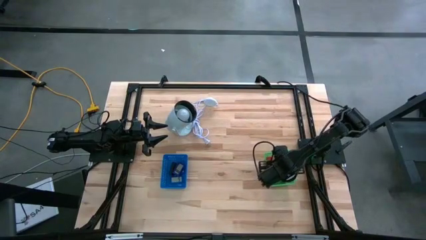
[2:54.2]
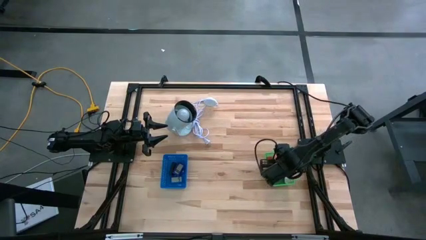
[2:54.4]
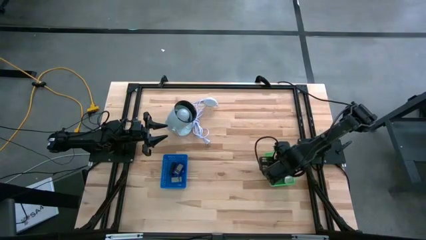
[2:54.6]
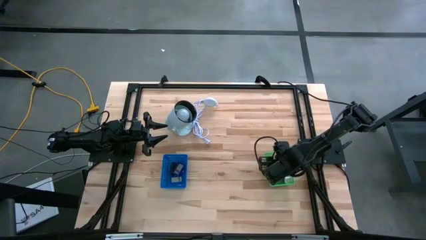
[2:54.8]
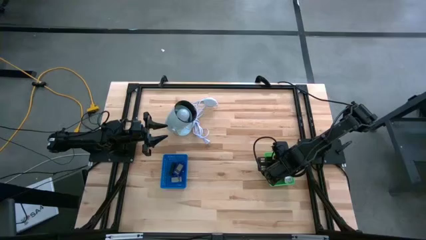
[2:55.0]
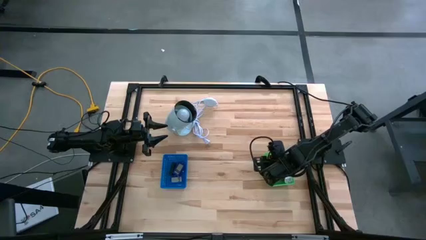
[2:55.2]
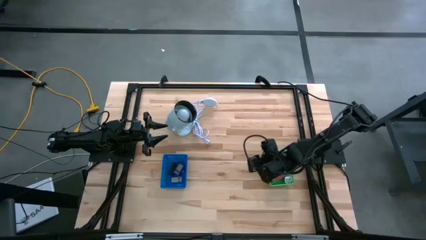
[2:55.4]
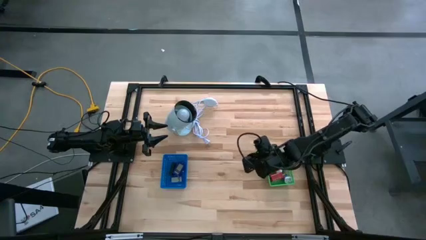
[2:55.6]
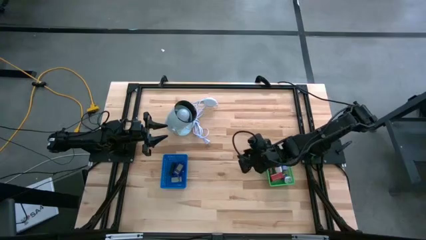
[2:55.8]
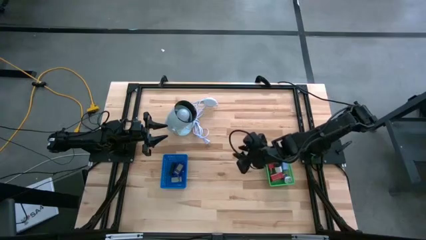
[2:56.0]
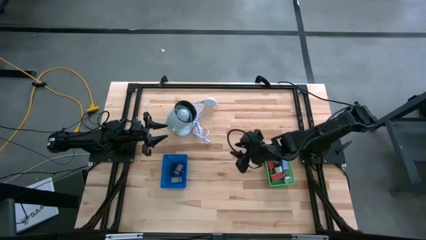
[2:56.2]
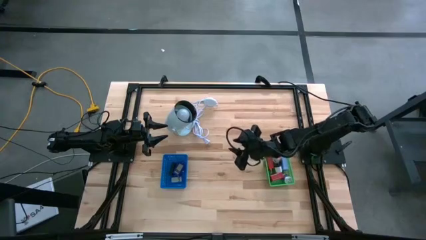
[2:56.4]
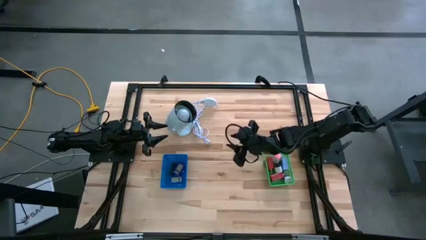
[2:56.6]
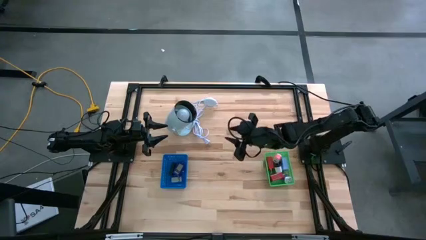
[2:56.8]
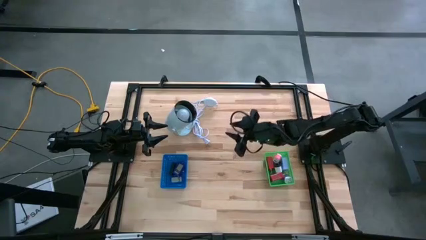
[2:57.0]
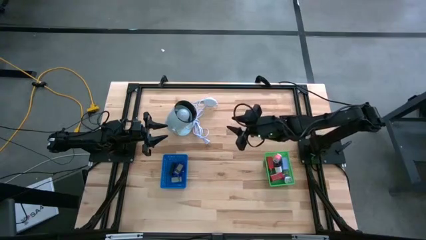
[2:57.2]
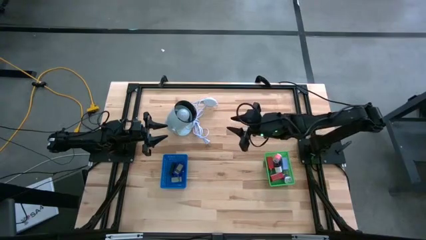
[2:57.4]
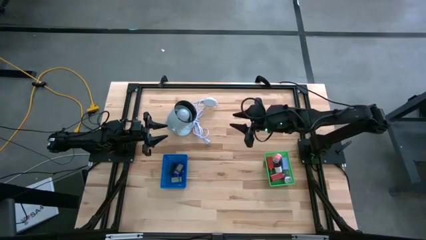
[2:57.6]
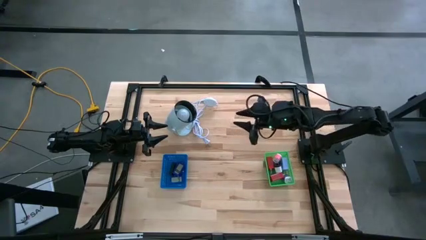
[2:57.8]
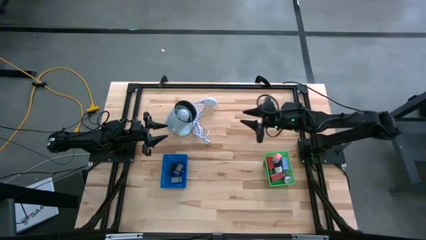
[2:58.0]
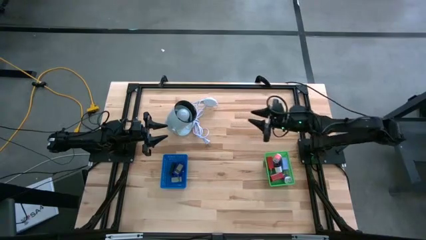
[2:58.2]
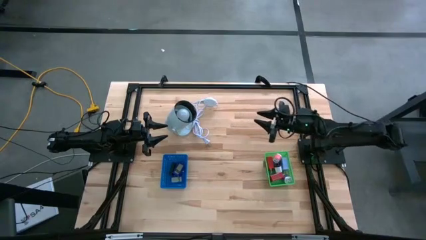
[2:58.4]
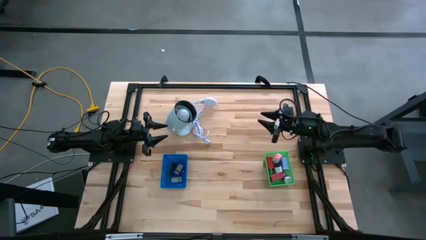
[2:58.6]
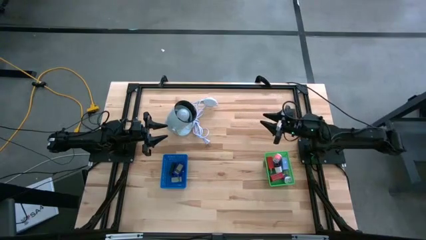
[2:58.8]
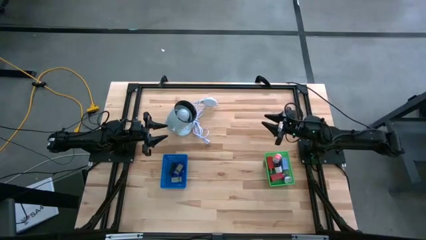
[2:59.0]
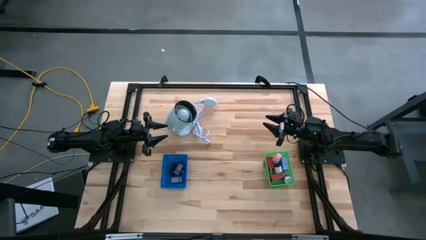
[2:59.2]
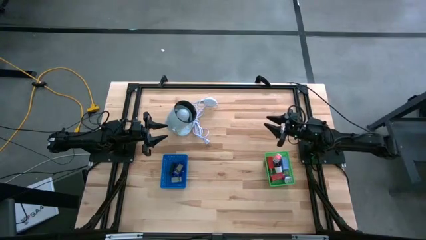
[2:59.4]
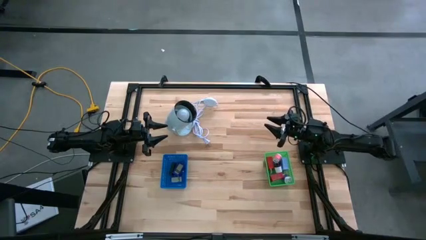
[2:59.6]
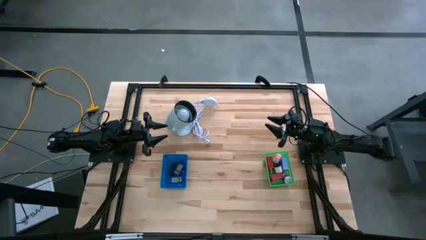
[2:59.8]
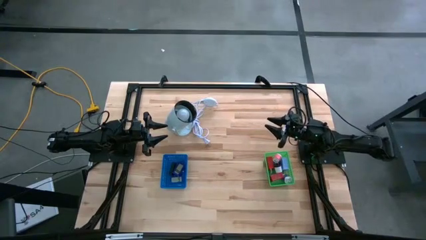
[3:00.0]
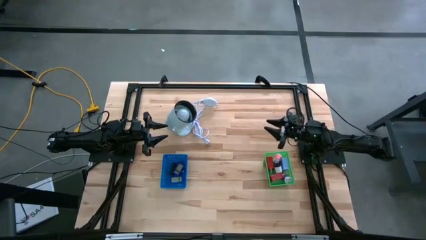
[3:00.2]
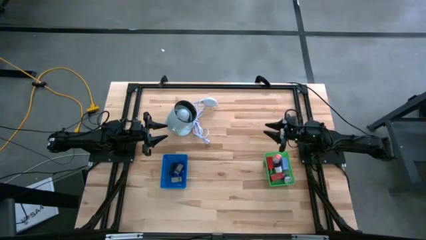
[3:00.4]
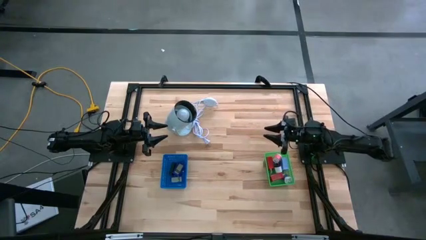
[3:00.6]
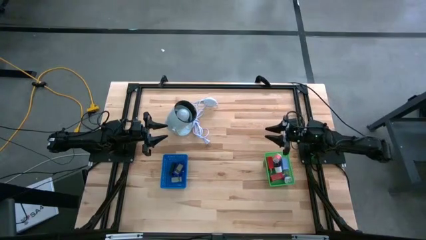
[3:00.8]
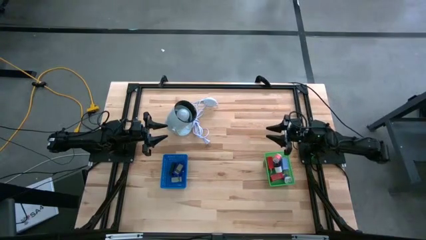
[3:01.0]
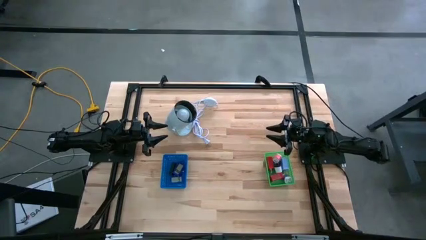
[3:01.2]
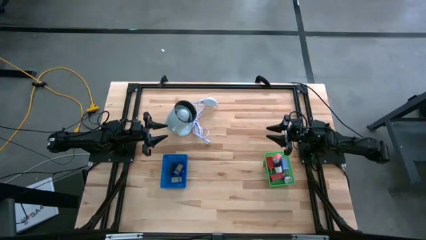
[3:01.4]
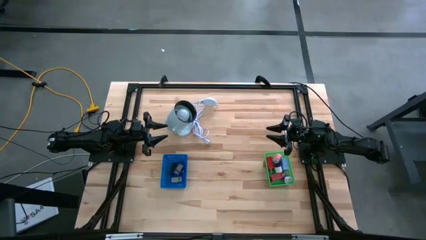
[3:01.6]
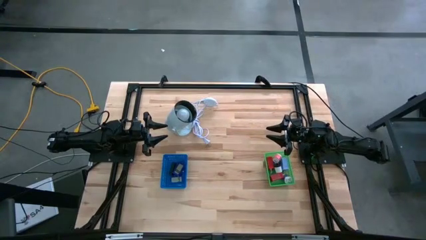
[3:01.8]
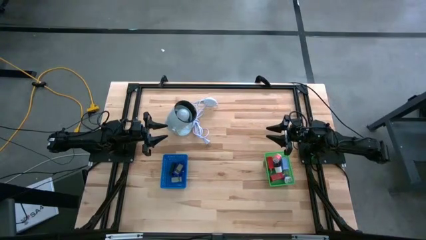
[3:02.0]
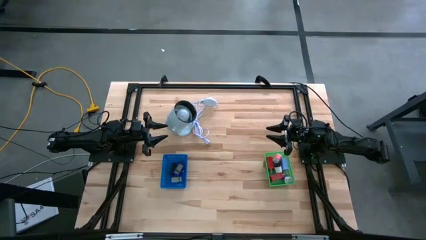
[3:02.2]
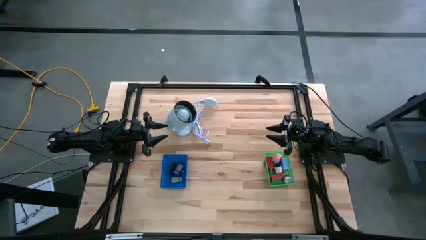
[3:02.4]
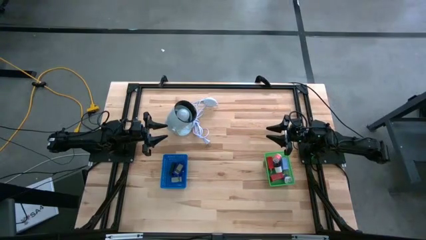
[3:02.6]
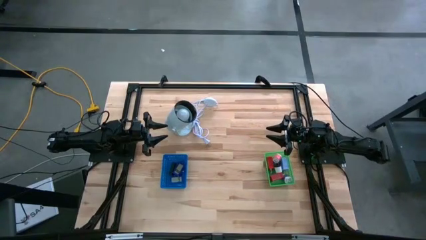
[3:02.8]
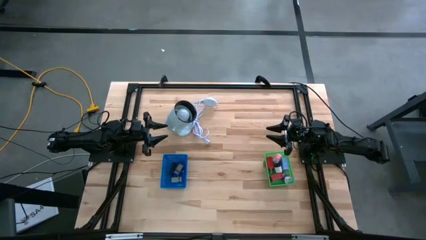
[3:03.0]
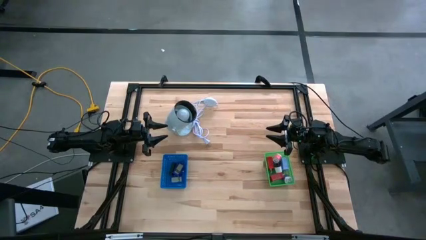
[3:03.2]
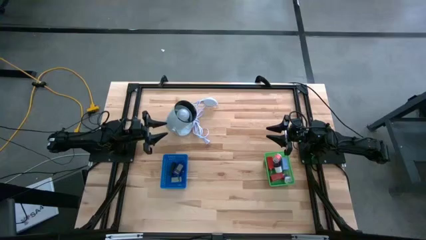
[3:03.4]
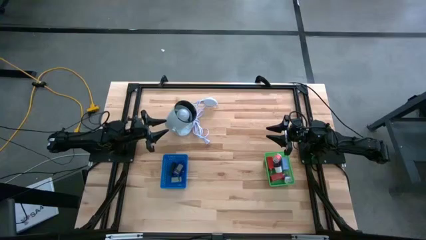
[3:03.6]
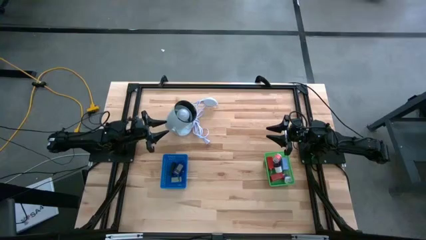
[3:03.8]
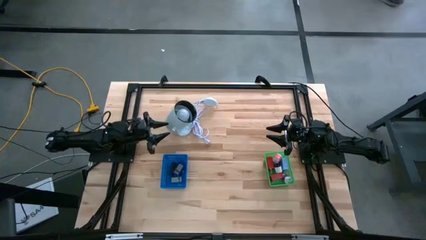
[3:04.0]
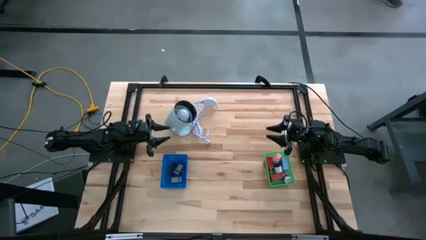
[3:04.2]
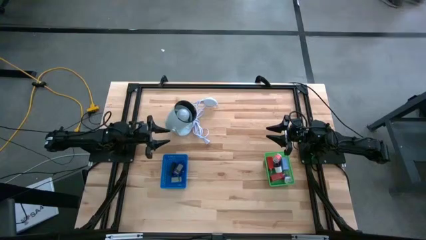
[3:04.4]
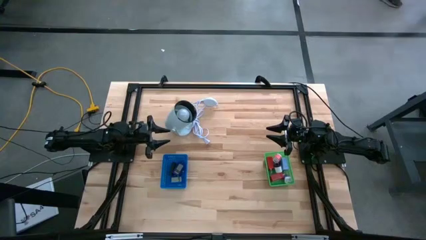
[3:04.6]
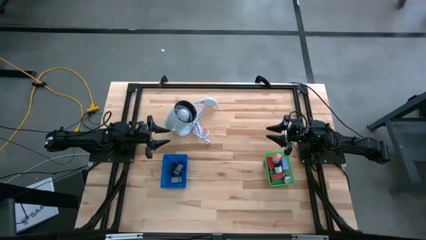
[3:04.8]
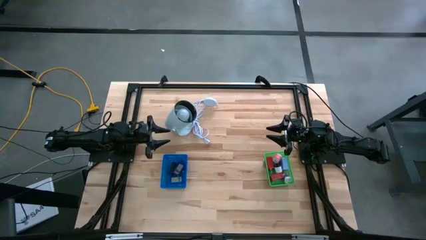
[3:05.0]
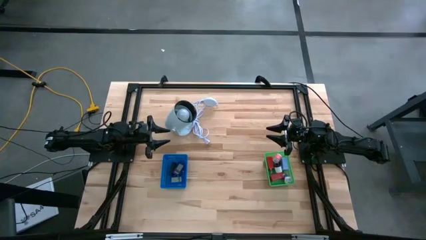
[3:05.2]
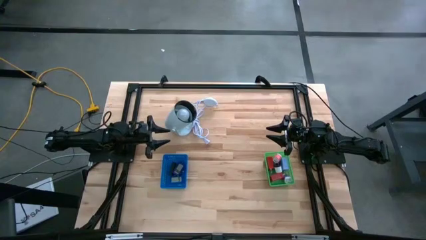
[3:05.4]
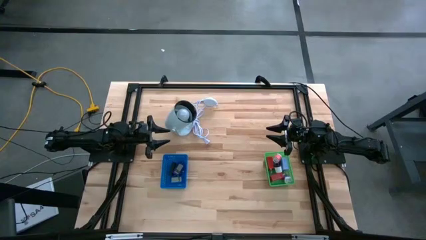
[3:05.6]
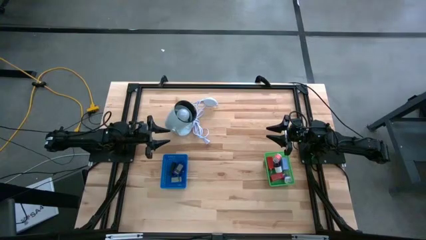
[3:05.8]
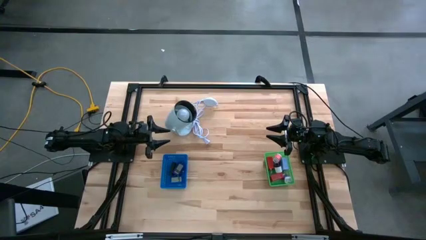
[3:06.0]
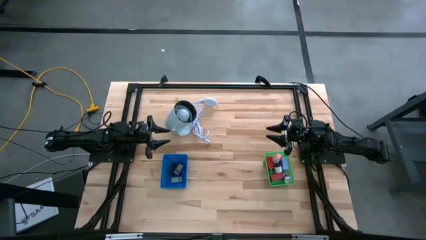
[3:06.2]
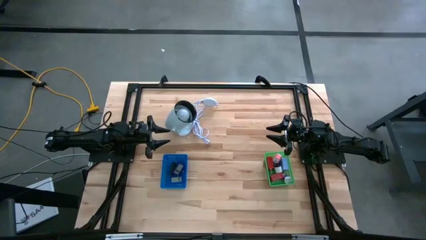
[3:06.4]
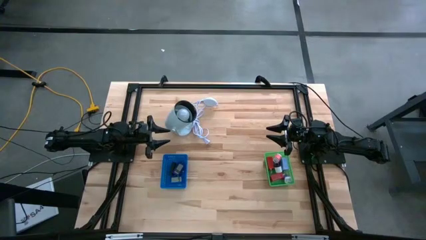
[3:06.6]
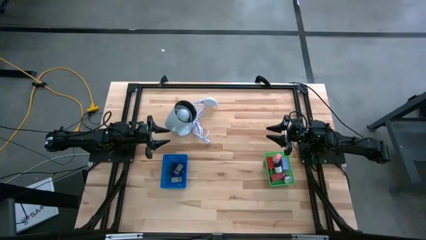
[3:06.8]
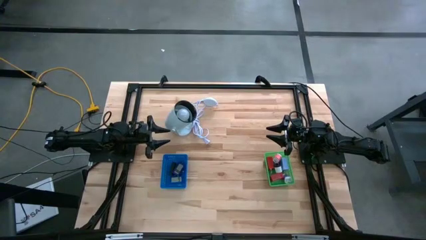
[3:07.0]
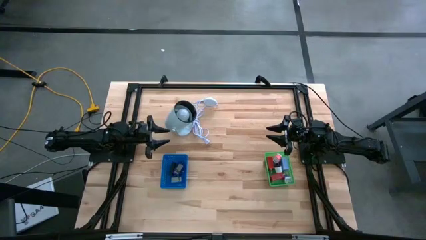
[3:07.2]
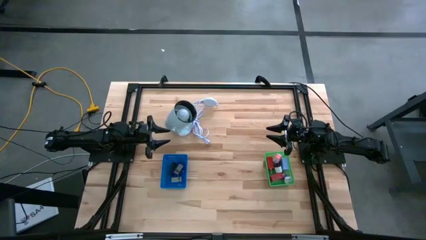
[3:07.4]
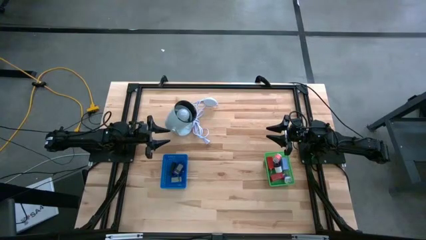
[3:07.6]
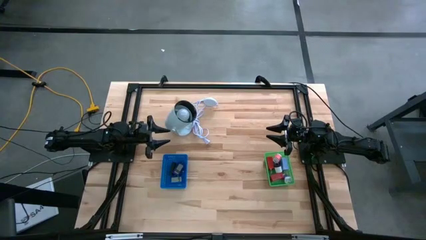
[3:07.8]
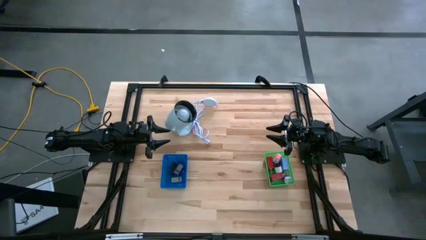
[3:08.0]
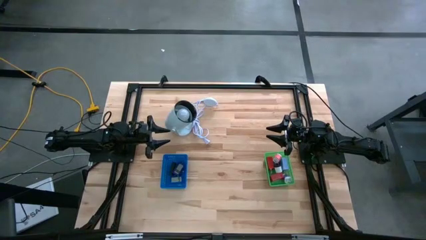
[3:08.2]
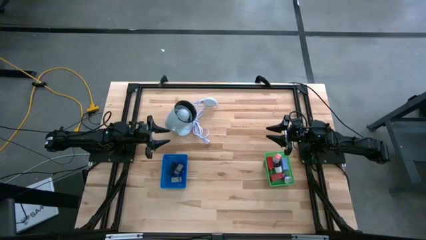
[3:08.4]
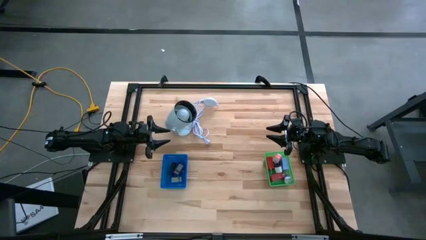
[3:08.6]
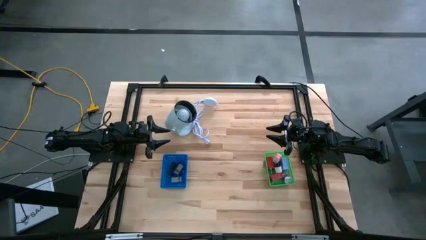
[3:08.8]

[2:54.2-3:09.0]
Task: Pick & Place Office items
Return to Home Position
